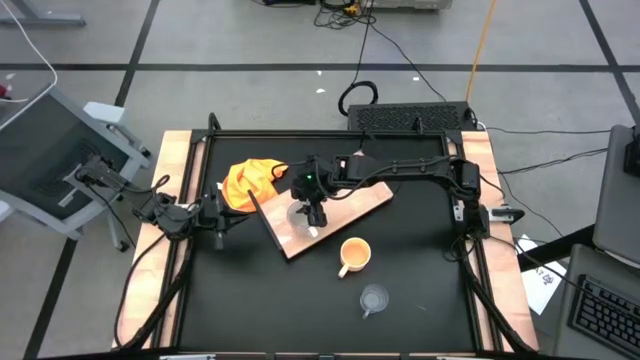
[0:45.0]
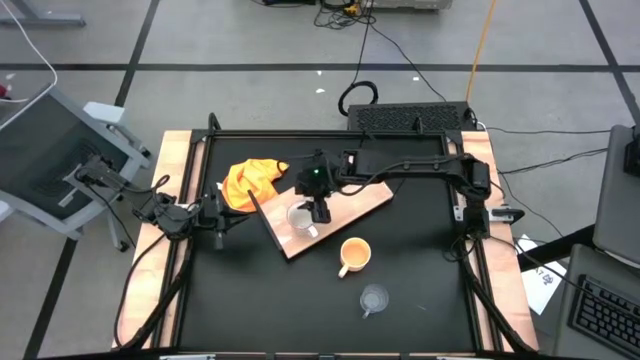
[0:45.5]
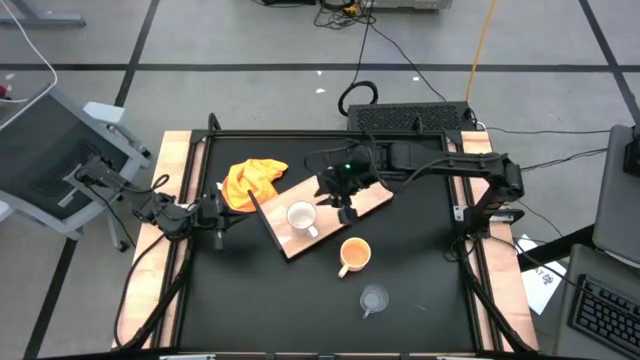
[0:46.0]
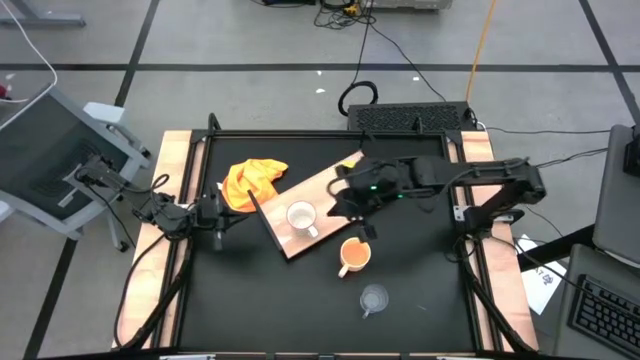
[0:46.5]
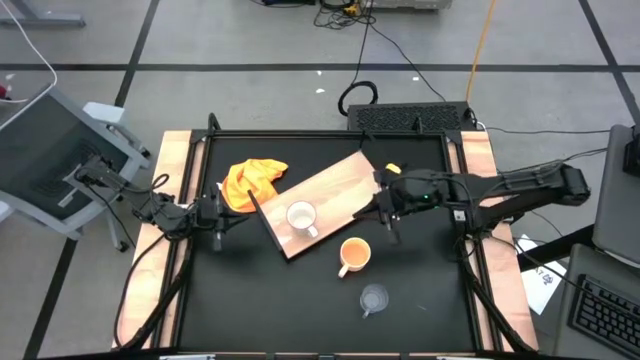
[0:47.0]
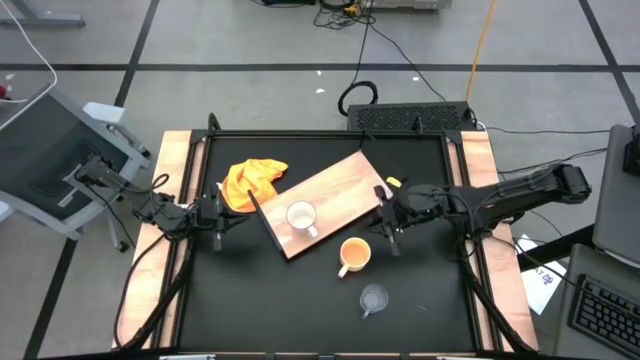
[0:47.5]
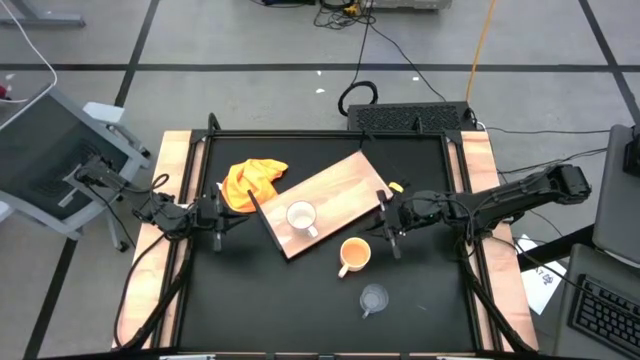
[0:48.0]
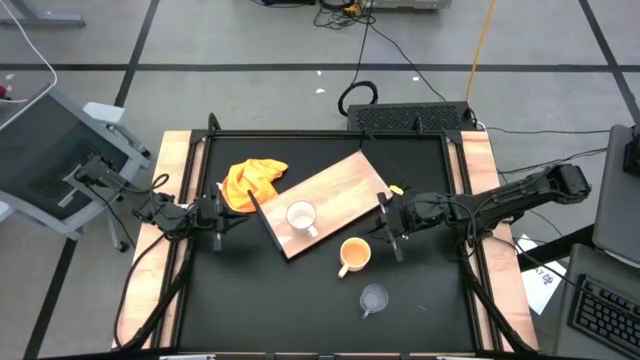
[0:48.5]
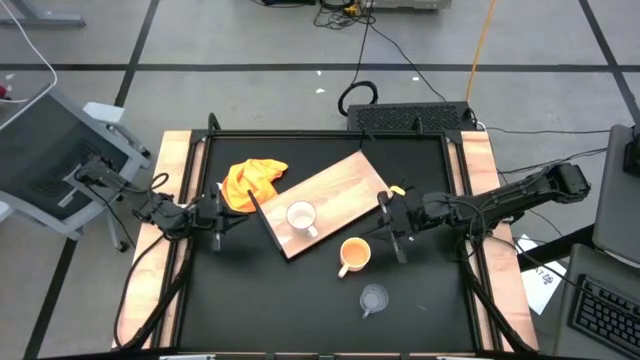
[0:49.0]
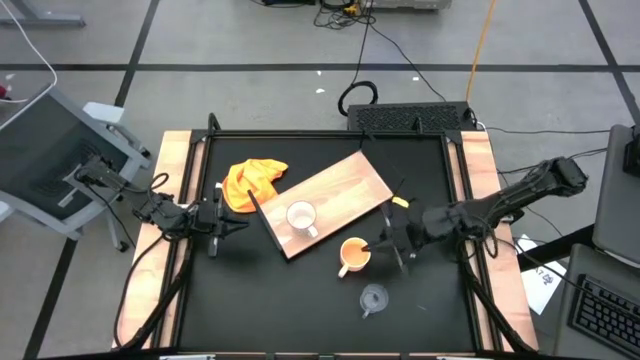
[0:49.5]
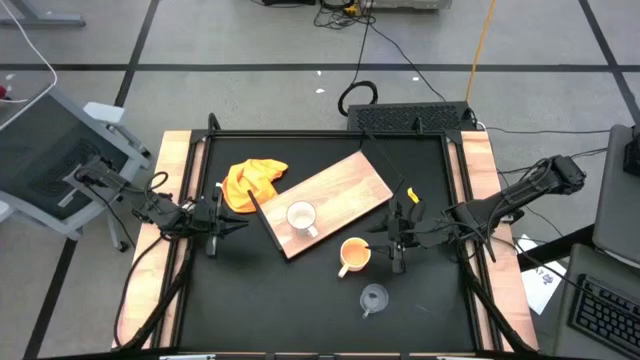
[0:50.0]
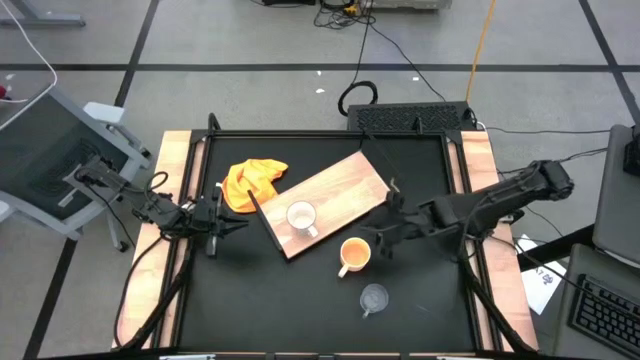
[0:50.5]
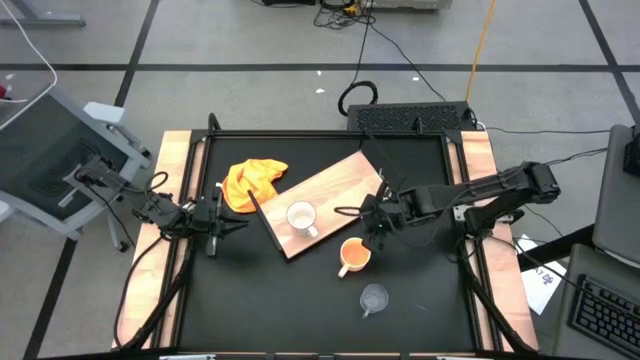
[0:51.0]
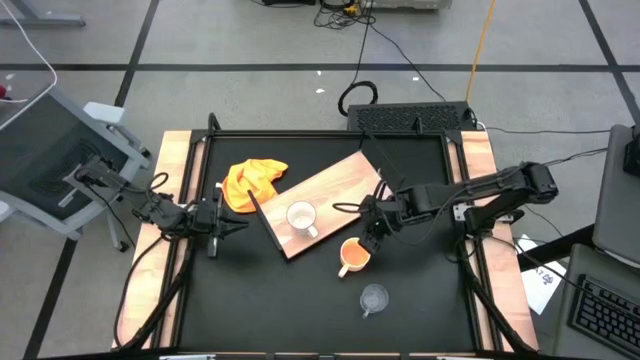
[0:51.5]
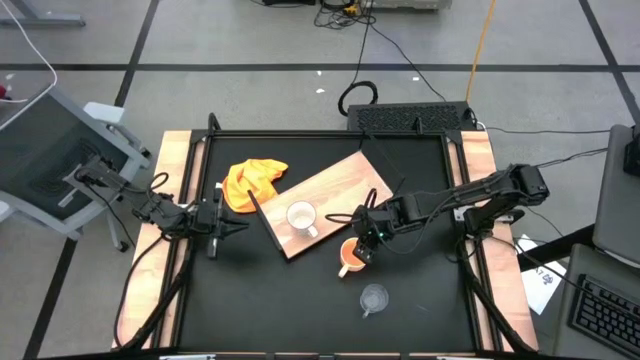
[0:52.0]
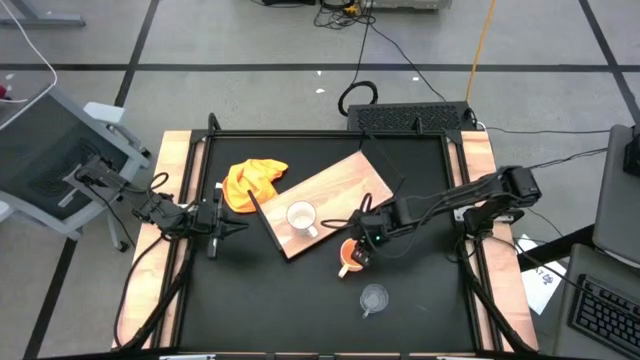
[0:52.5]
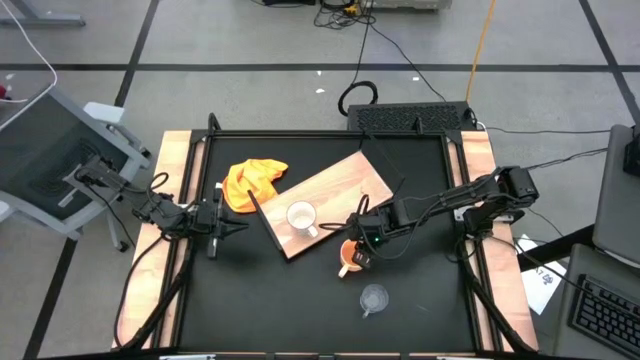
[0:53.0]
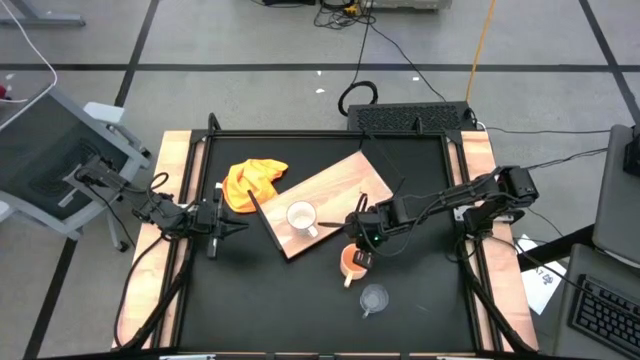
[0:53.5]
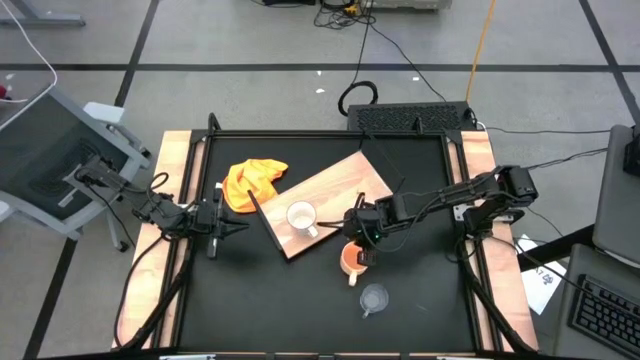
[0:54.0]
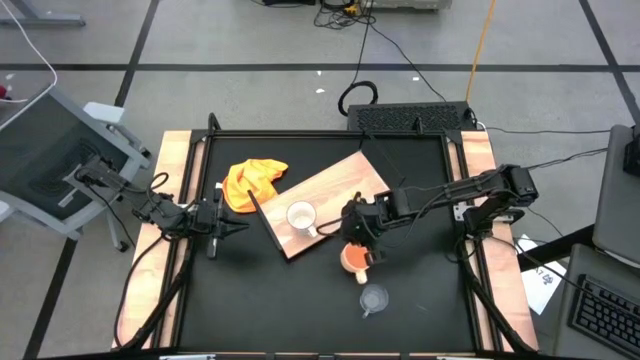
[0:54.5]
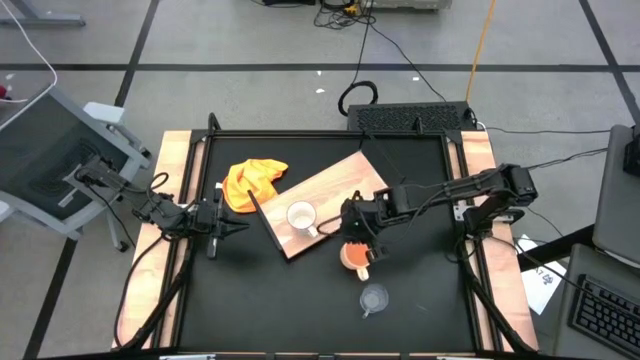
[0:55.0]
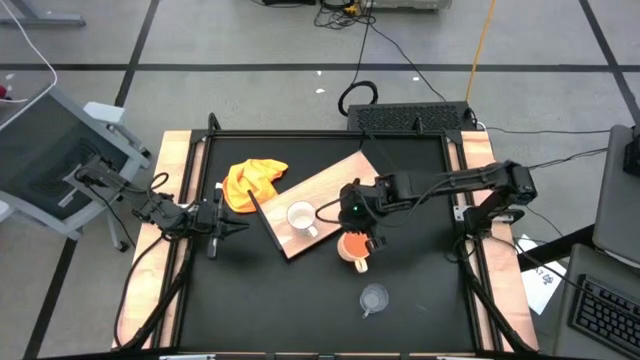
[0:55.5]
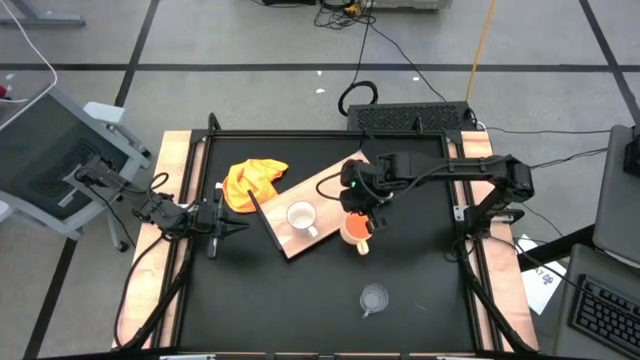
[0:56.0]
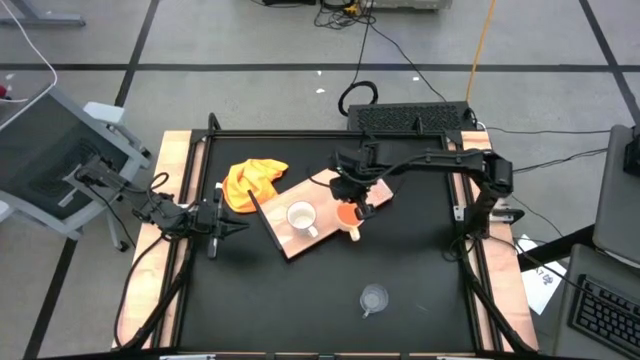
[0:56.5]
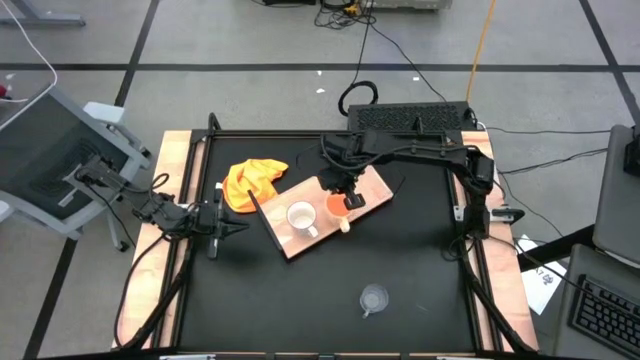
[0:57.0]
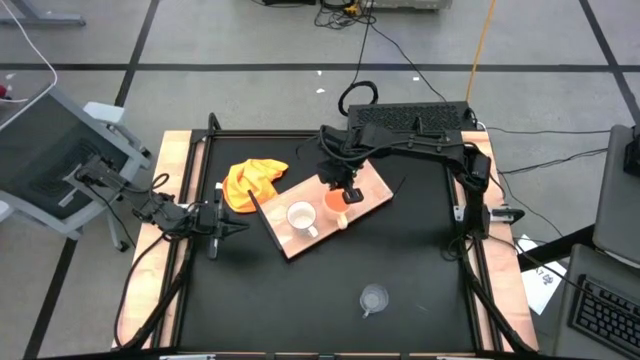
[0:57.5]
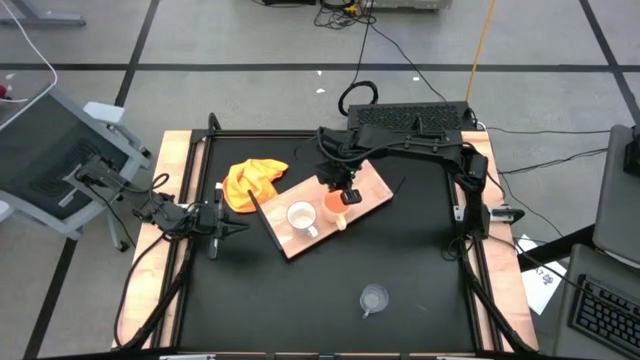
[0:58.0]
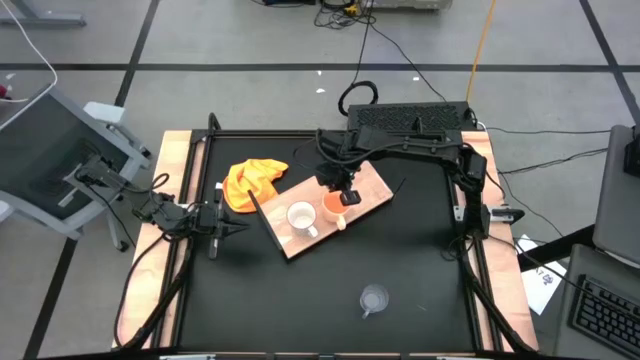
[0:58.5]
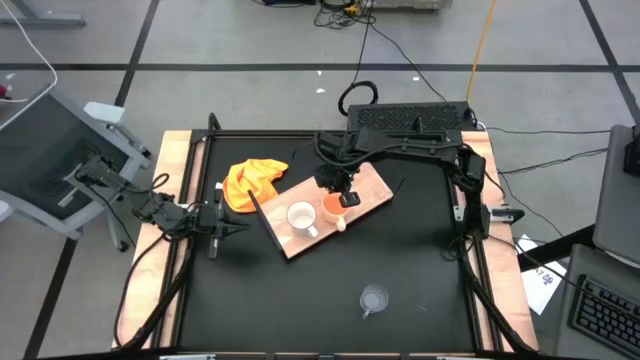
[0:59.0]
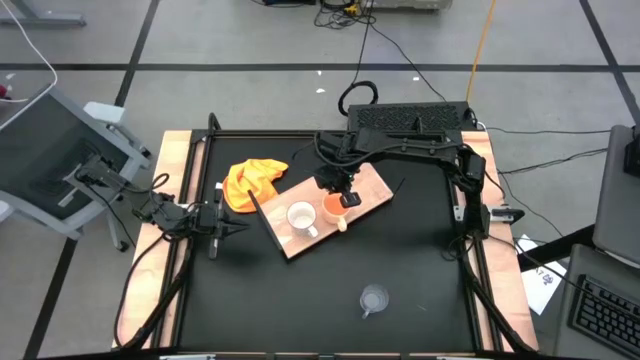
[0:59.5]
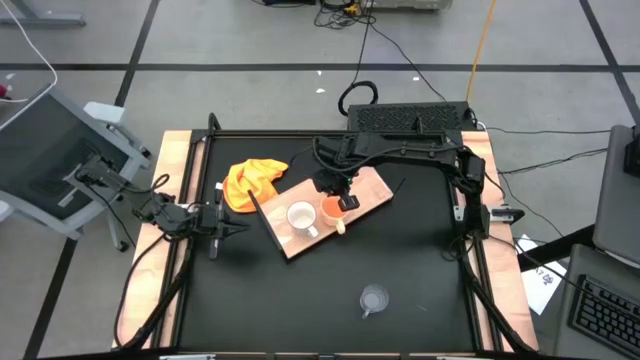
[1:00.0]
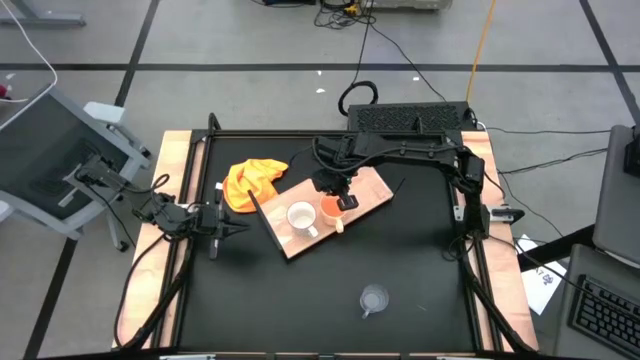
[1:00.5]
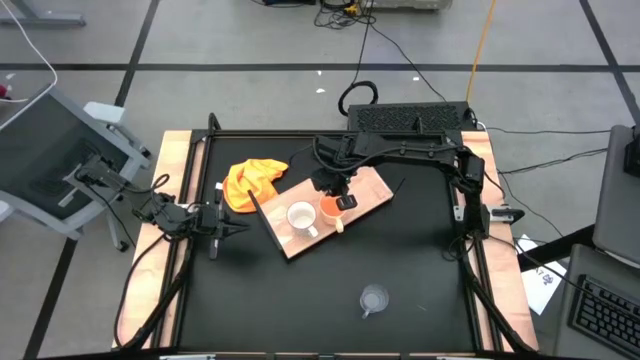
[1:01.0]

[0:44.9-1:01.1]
Task: Stack small to large cups/mugs on shelf
Put the orange mug on the shelf
